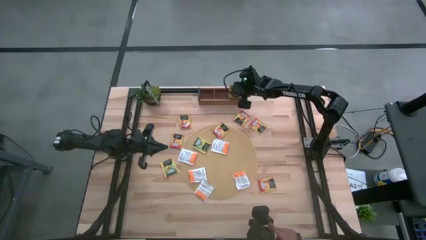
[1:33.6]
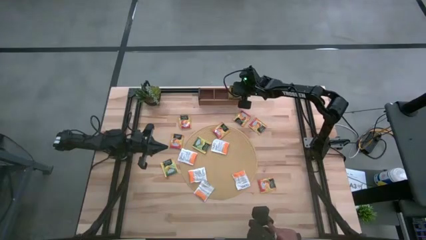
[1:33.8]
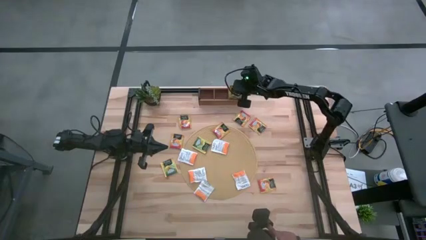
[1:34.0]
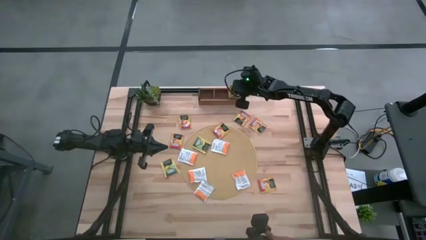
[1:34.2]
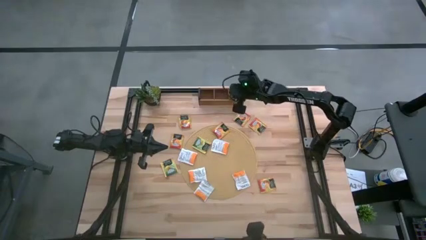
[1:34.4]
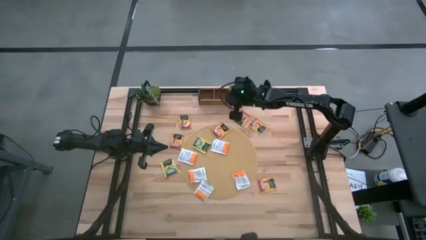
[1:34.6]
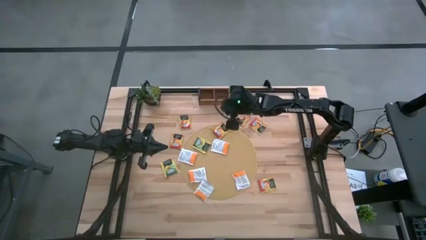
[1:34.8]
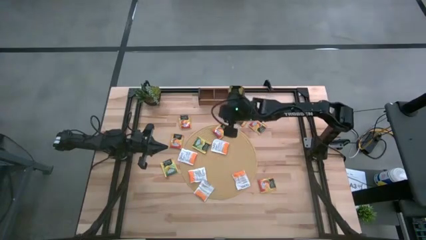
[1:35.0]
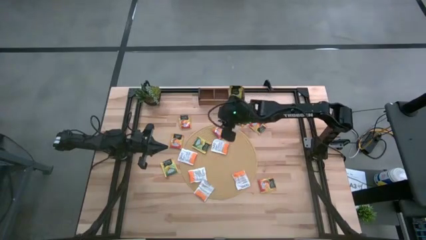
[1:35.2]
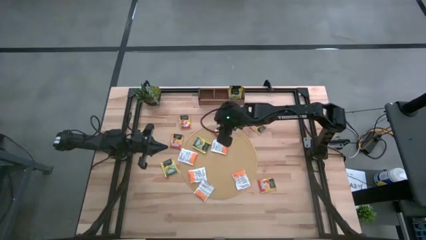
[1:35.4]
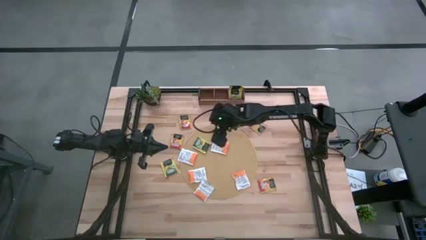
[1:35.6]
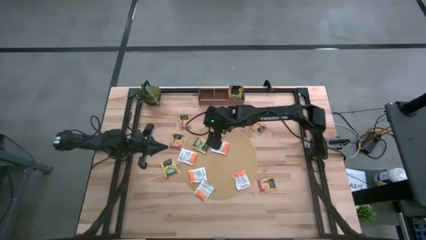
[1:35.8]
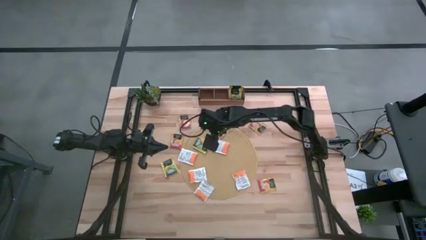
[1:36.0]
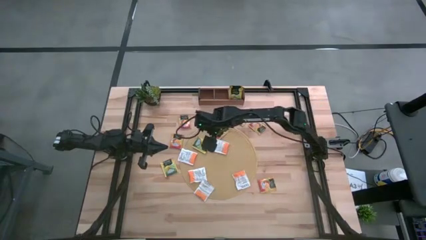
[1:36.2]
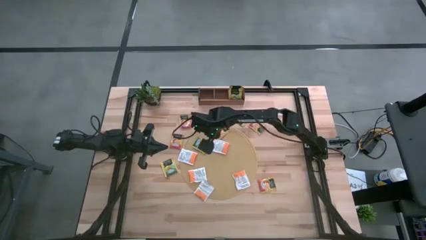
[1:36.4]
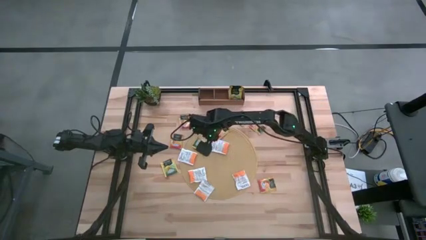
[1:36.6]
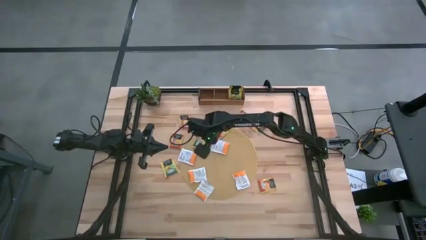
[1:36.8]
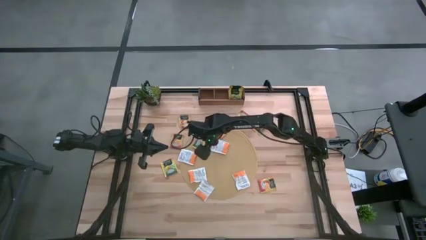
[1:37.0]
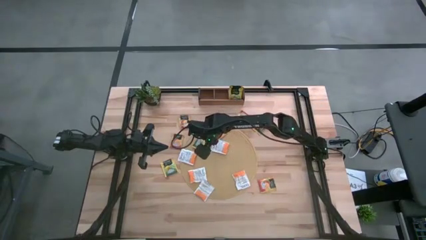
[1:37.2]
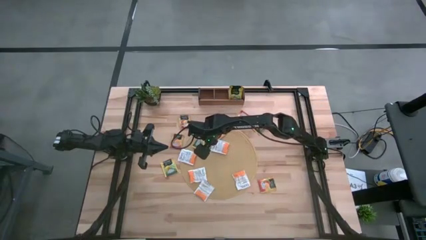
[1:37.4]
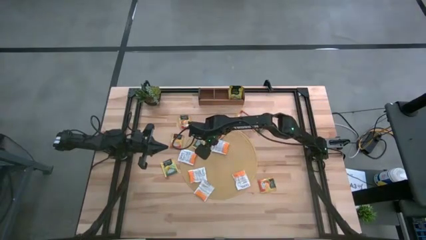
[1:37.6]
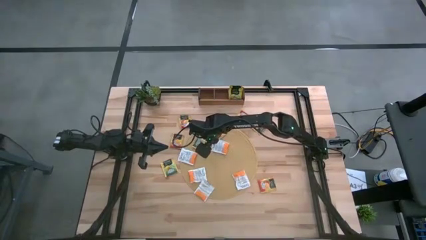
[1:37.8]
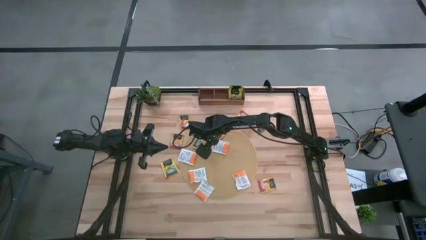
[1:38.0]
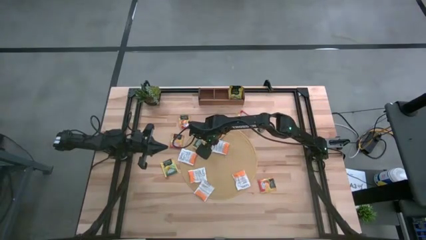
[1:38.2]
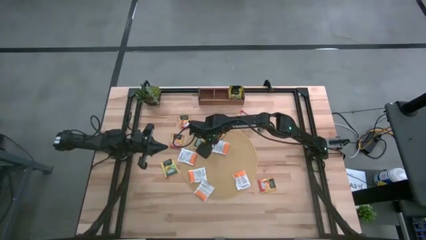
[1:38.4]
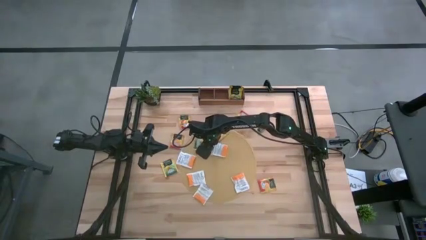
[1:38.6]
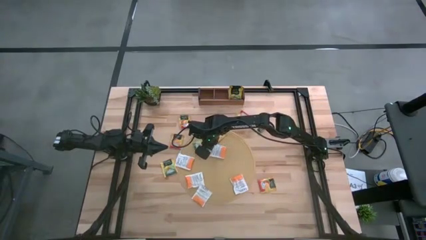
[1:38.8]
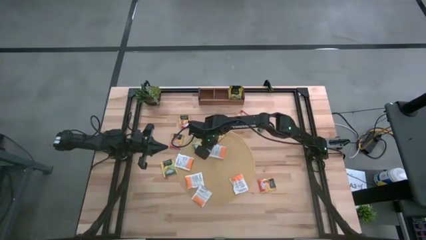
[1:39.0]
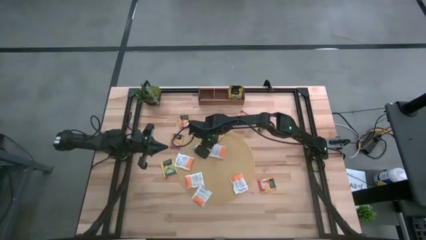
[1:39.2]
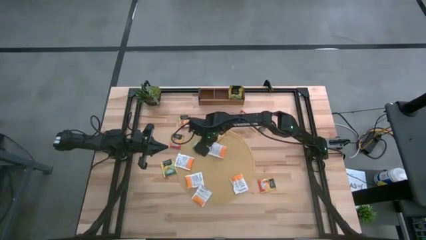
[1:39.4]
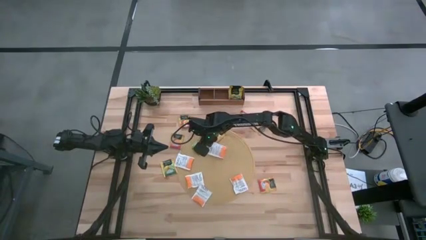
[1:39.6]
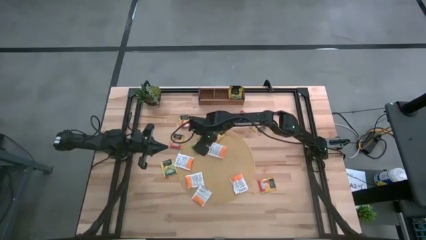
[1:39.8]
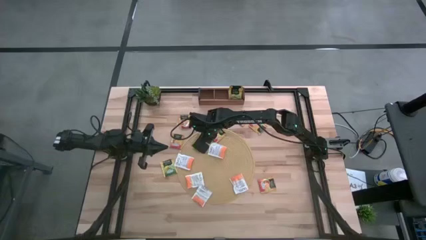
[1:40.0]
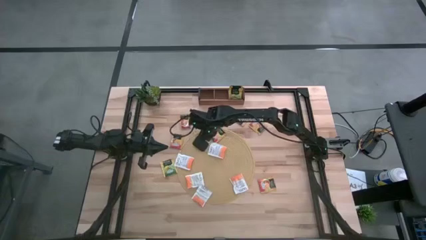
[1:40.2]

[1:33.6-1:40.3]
Task: Pick & Place Tea
Put the top yellow tea bag into the right section of the wooden organizer

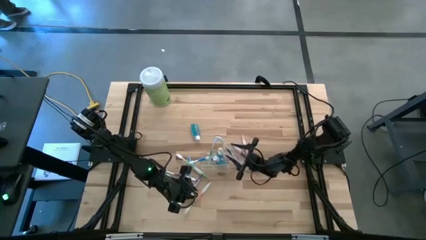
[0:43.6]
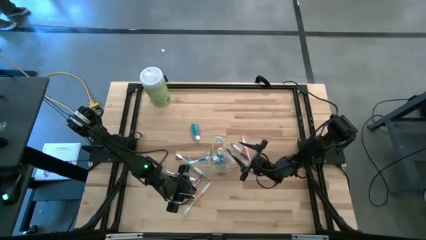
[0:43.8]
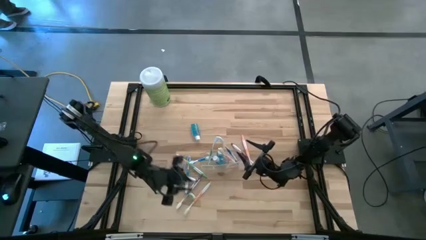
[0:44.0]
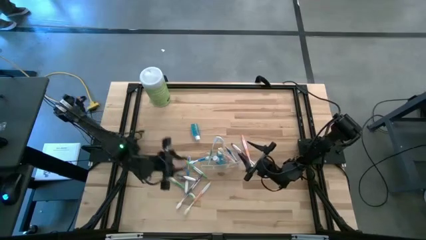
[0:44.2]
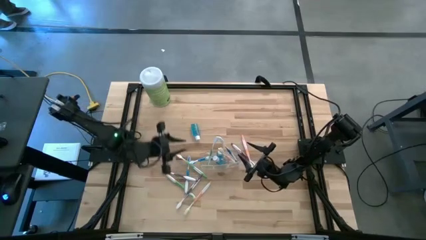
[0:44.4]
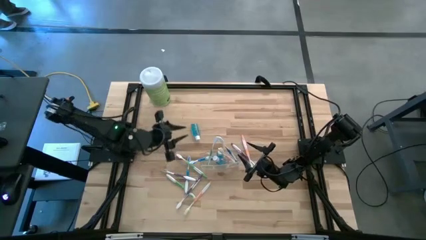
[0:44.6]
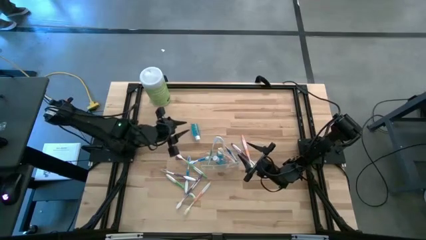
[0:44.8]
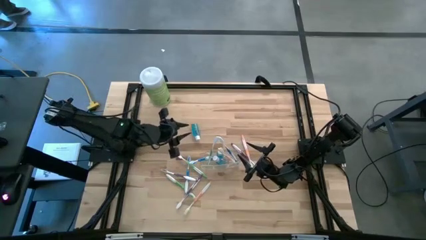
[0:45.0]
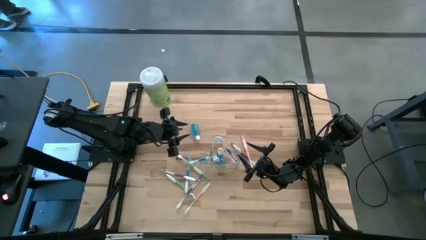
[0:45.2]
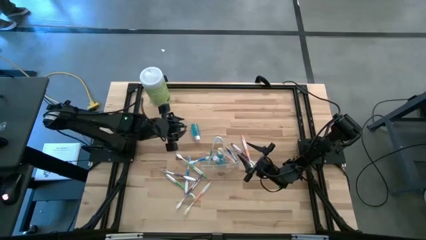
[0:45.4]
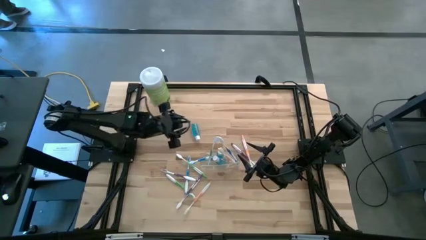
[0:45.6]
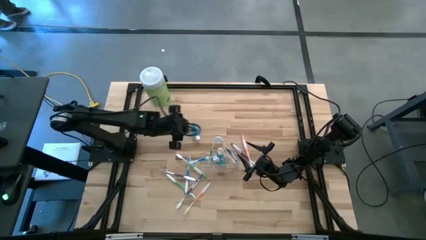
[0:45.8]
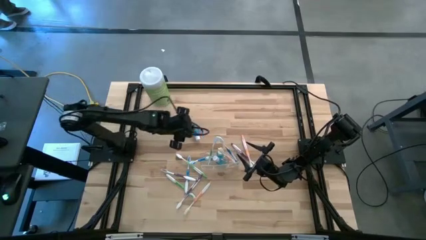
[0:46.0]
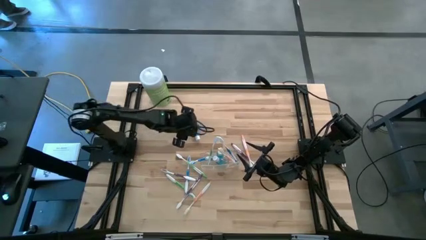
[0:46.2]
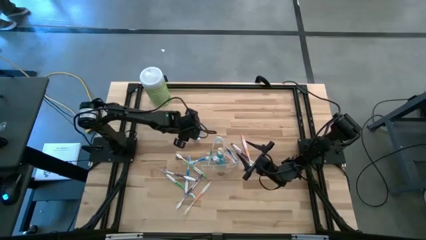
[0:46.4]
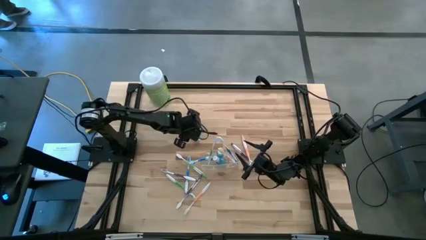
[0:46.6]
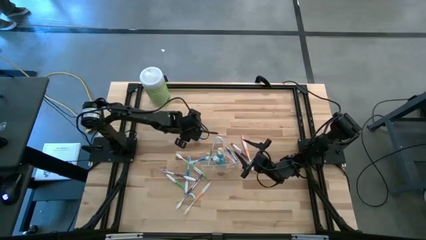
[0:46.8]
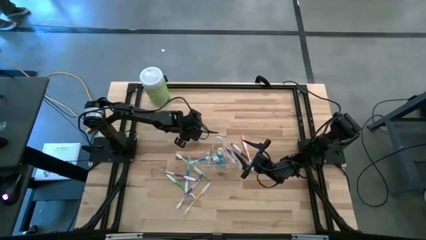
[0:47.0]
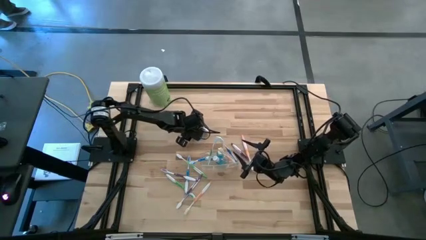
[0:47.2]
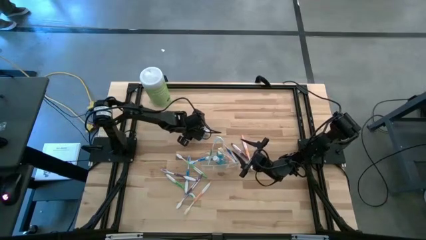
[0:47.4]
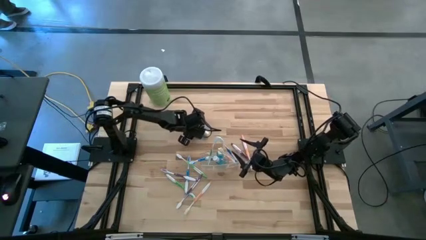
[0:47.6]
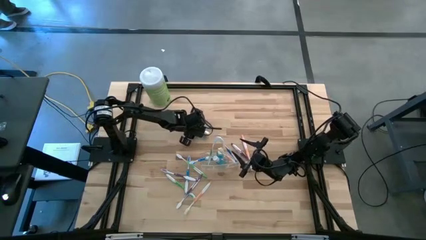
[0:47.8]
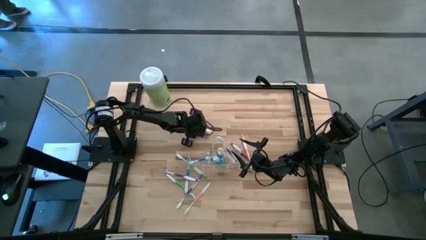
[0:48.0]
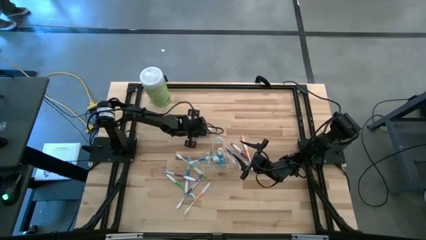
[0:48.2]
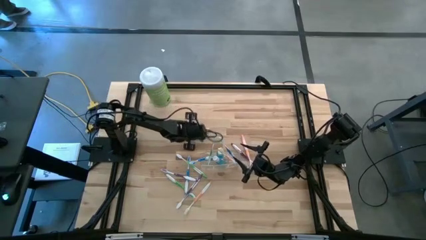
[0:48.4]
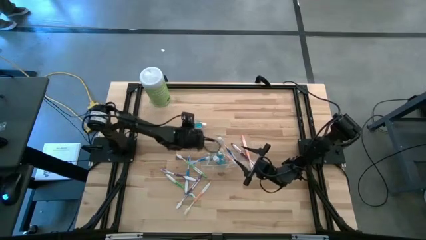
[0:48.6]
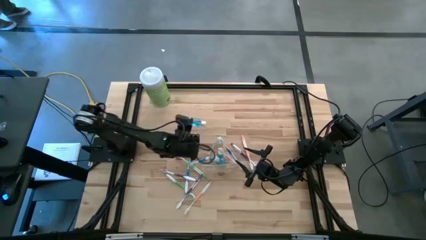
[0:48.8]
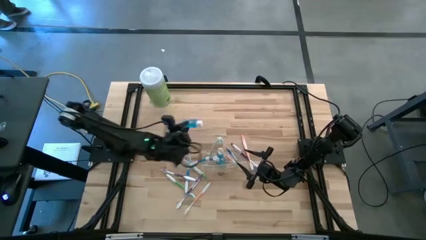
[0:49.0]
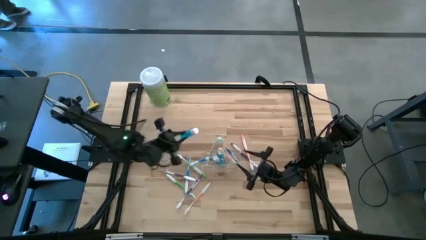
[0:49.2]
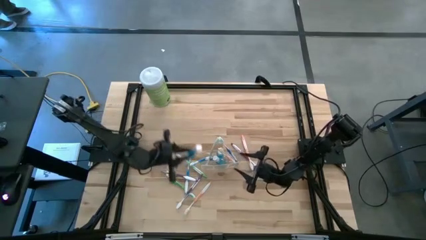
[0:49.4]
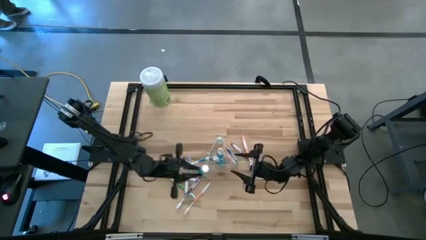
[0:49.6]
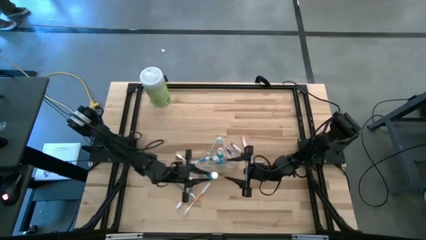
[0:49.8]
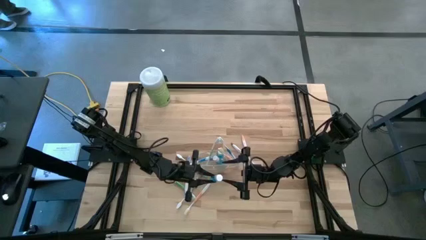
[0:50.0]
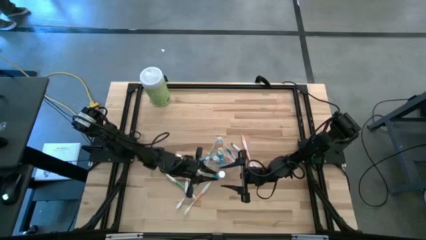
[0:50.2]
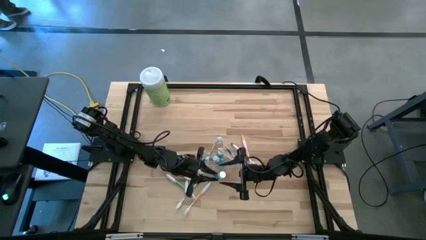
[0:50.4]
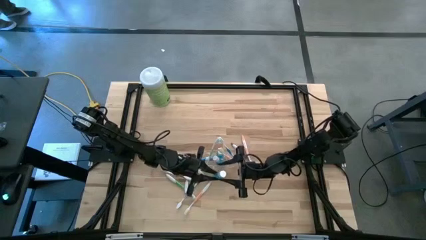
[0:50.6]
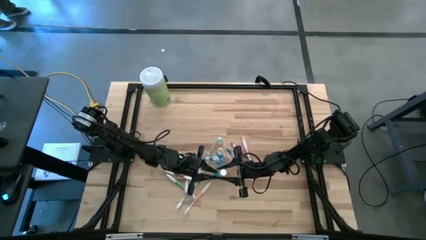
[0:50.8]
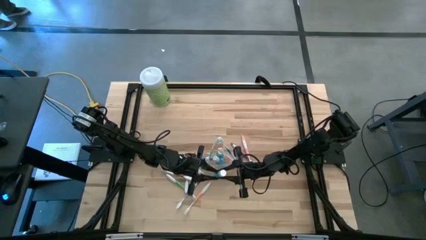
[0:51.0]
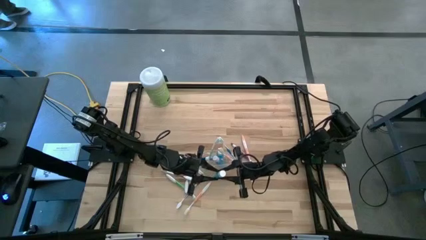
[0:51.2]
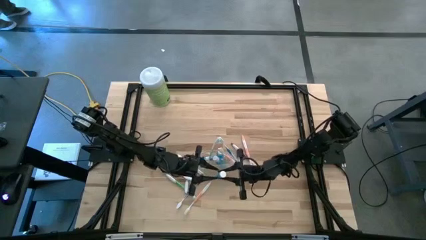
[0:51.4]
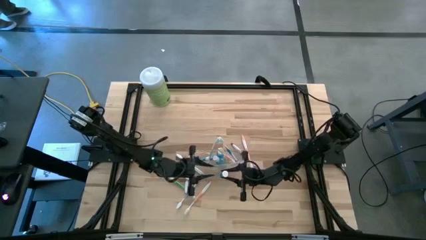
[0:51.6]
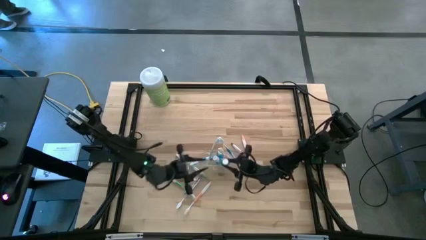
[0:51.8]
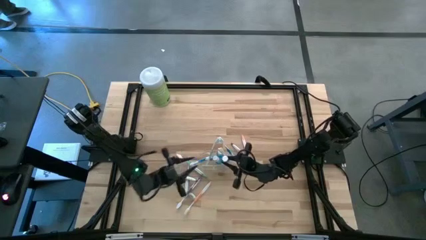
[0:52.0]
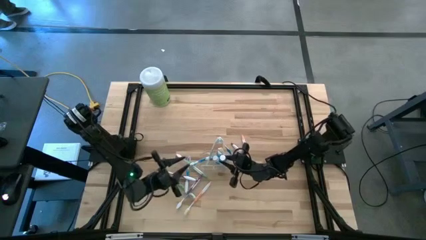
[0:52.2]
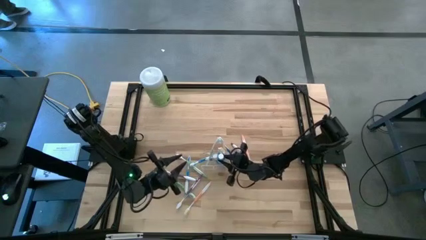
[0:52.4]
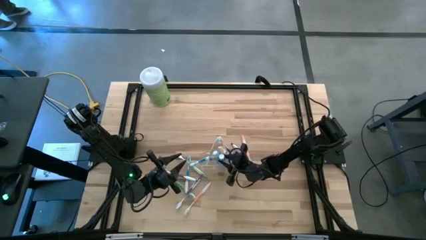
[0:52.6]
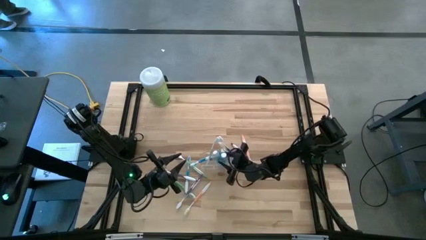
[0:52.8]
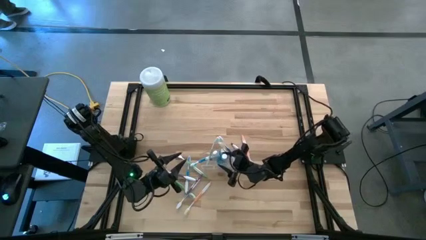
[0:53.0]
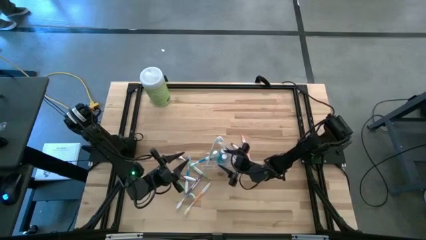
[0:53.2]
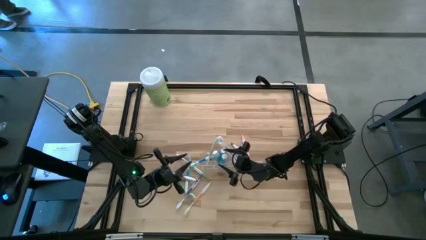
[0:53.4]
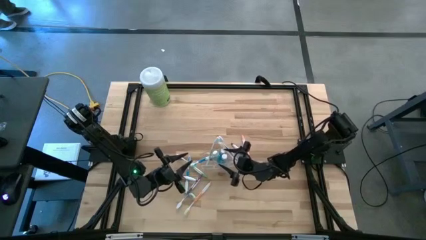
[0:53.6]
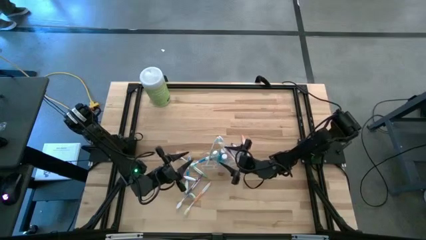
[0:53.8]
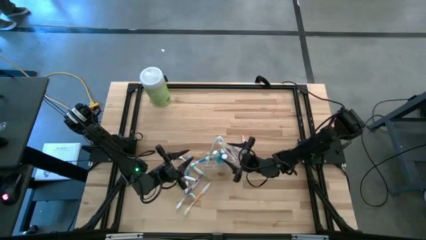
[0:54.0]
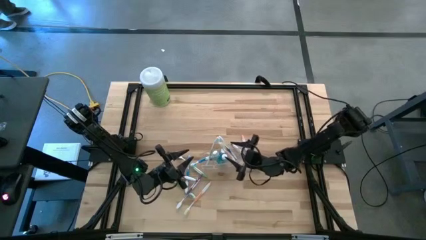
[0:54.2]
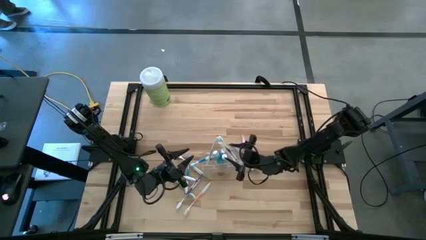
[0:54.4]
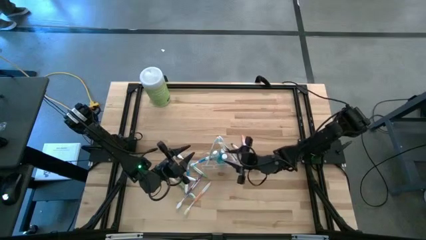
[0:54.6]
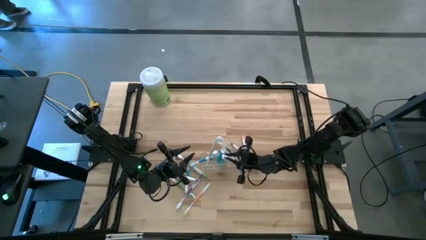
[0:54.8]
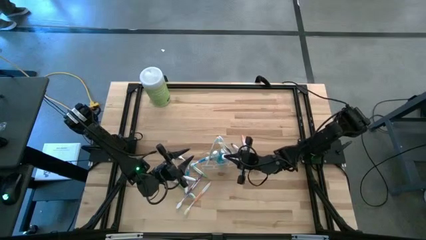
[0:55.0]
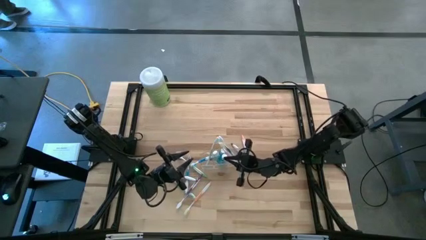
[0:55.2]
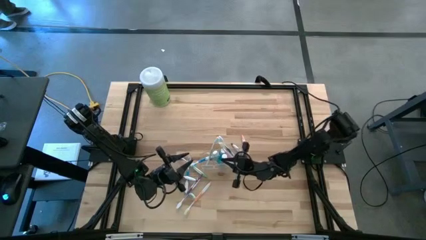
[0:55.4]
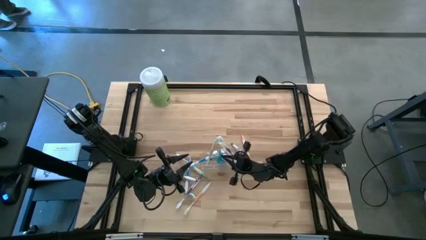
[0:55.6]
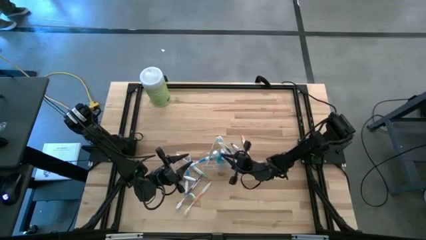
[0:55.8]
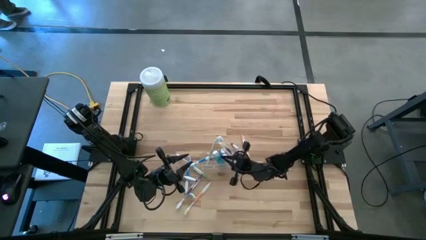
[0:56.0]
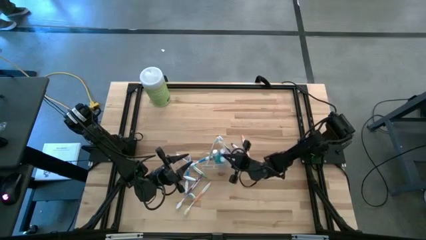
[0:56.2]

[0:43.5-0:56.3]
Task: Pick & Place toothbrushing station
Put the mouthwash into the transparent organizer
